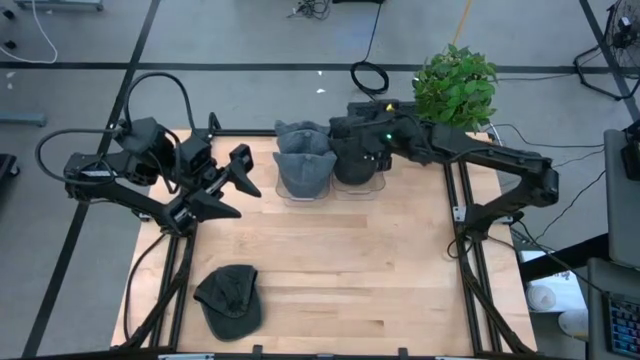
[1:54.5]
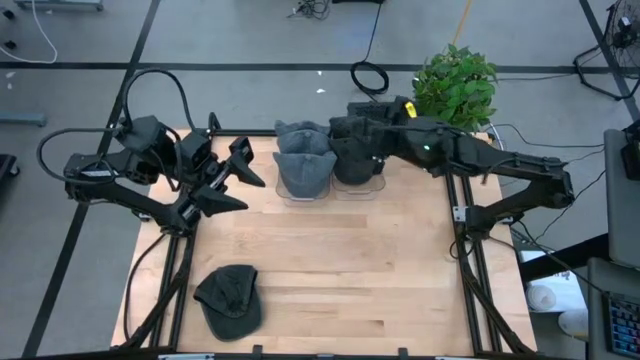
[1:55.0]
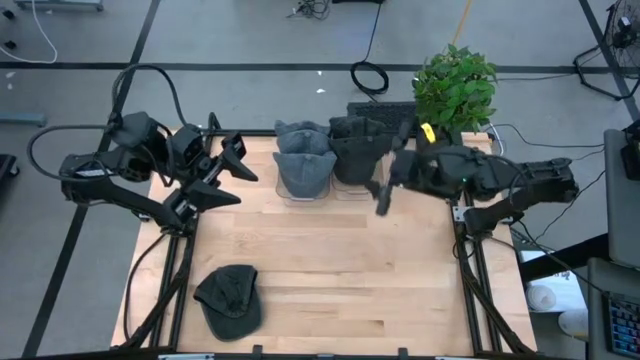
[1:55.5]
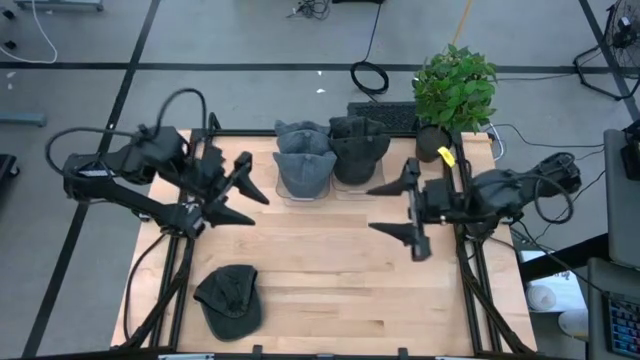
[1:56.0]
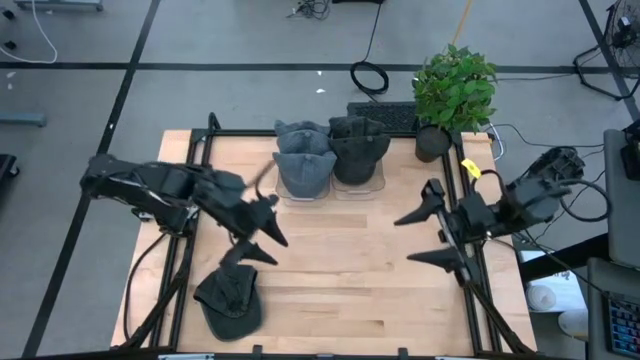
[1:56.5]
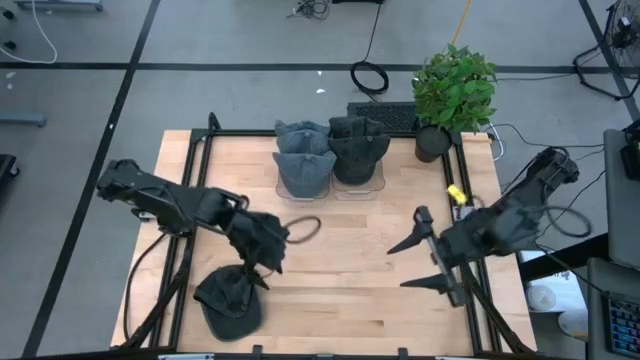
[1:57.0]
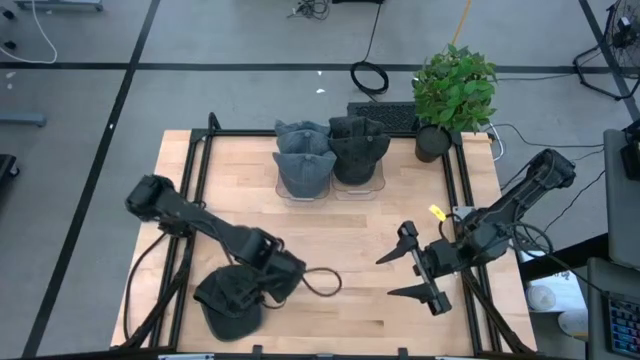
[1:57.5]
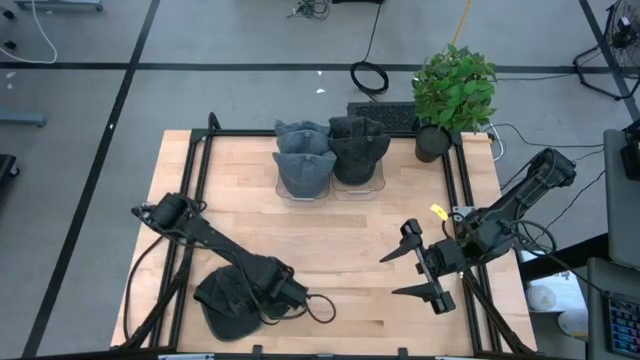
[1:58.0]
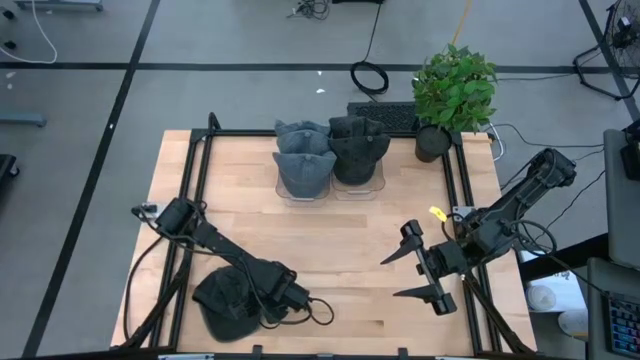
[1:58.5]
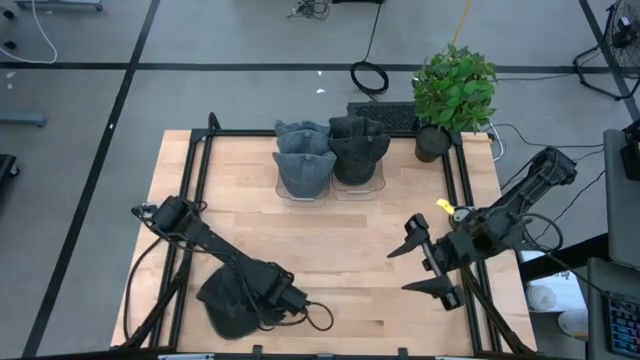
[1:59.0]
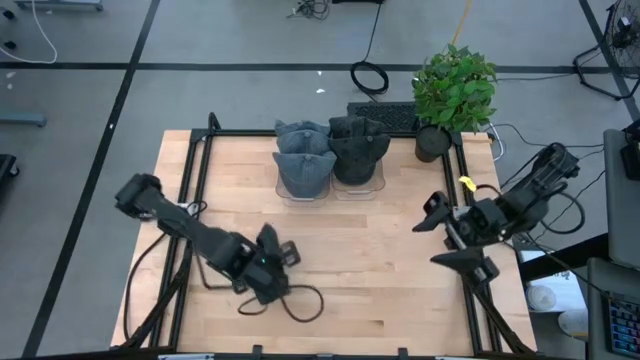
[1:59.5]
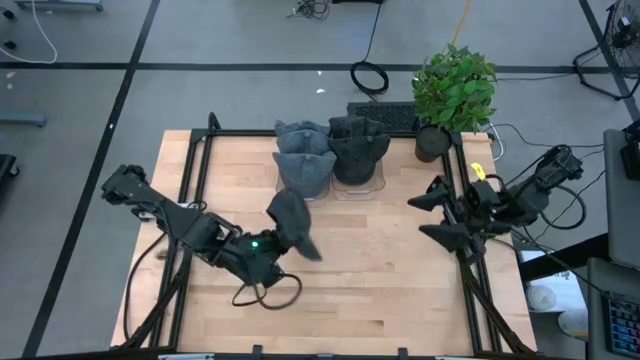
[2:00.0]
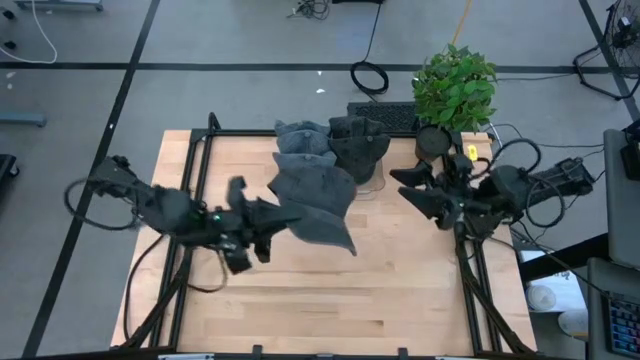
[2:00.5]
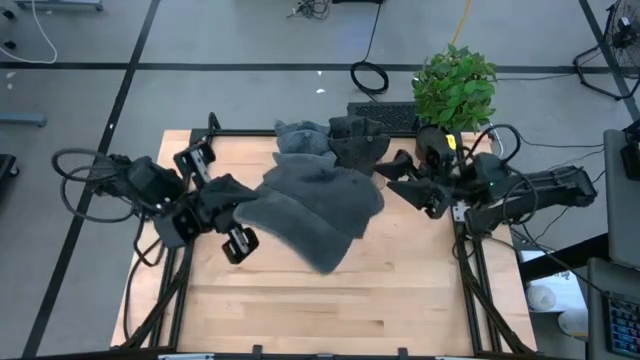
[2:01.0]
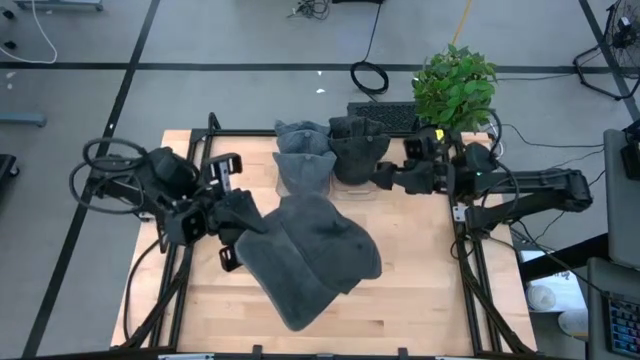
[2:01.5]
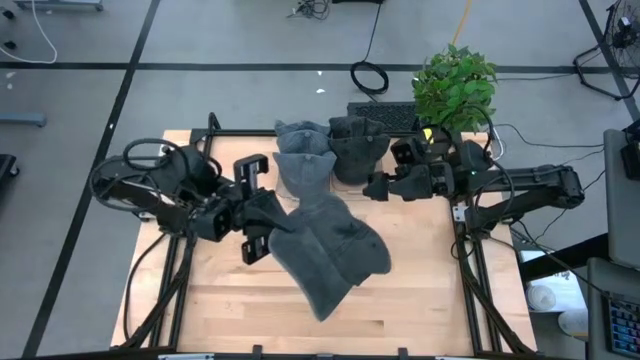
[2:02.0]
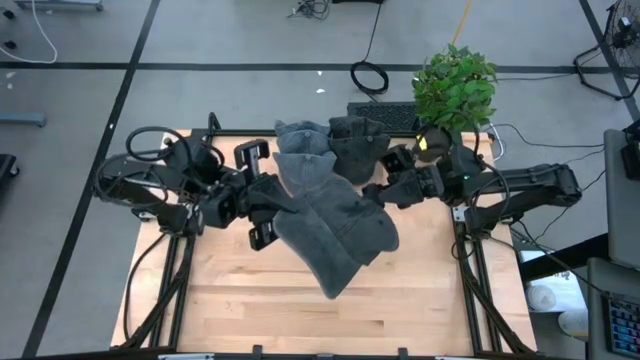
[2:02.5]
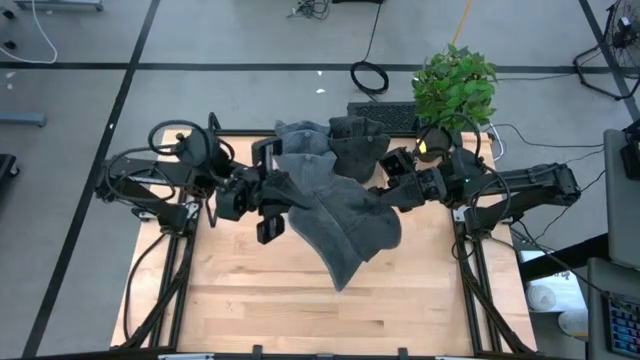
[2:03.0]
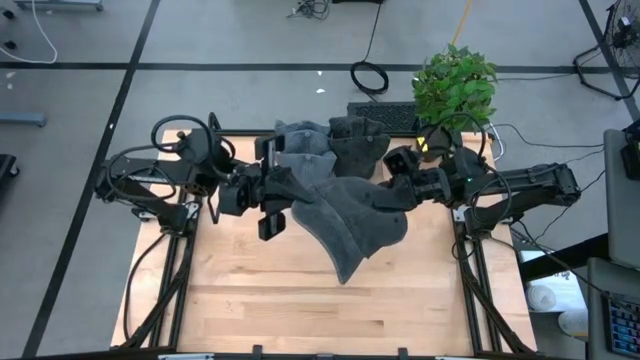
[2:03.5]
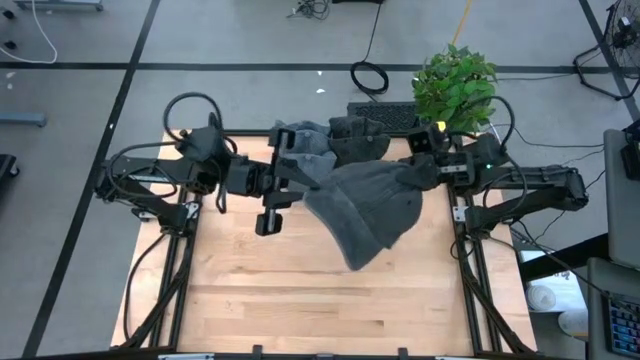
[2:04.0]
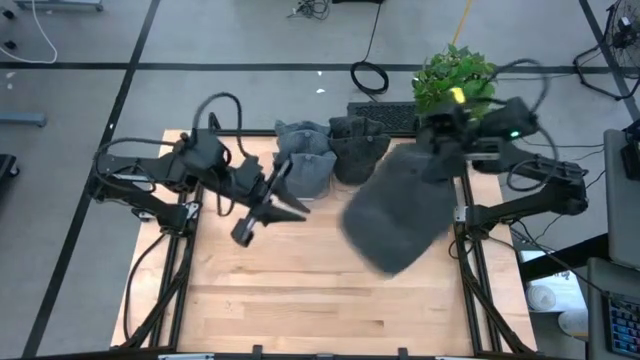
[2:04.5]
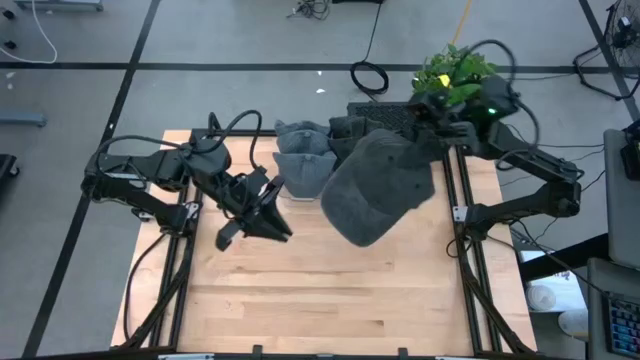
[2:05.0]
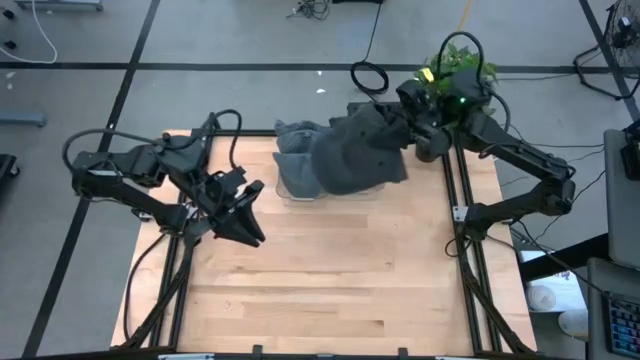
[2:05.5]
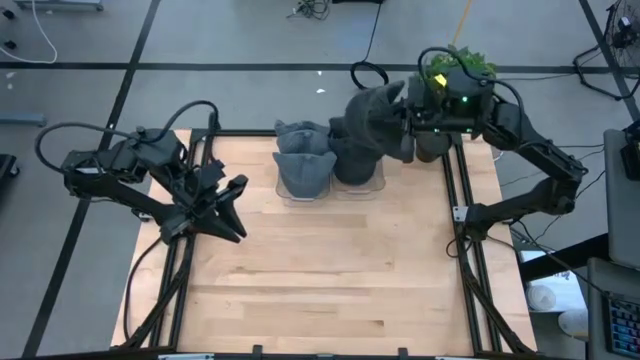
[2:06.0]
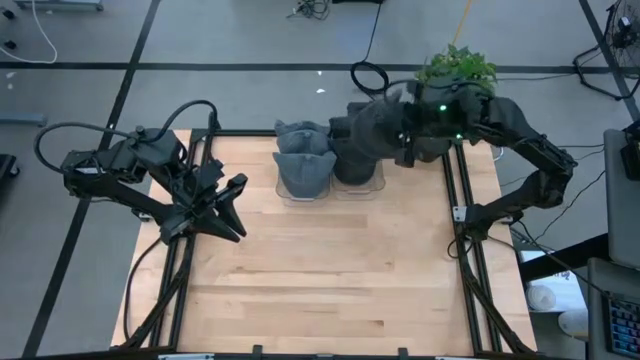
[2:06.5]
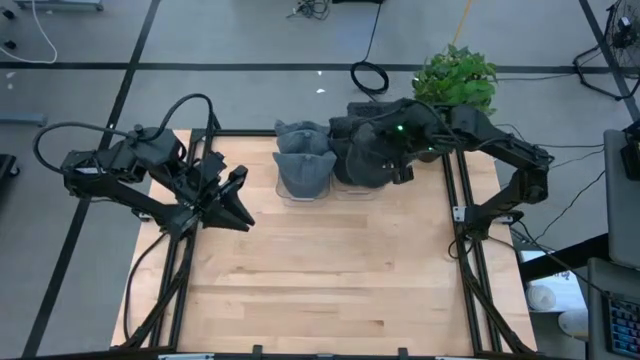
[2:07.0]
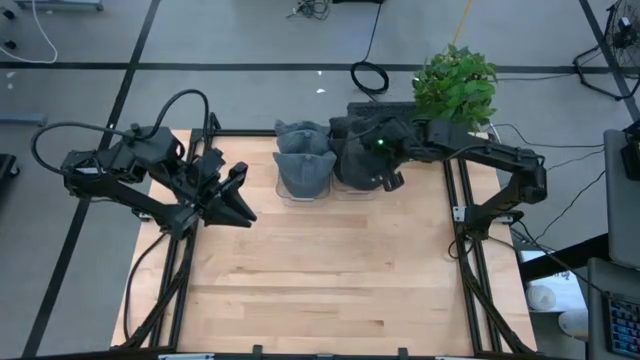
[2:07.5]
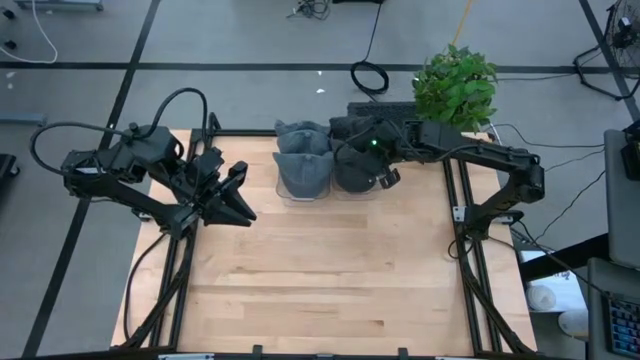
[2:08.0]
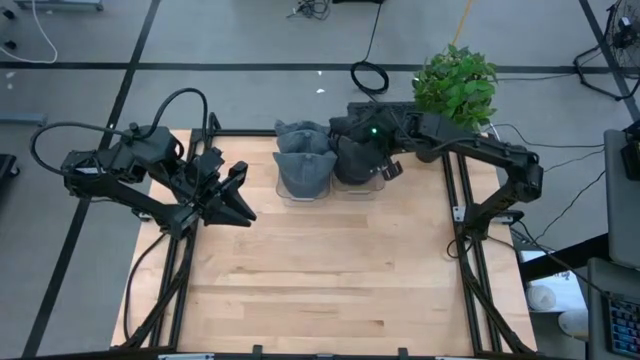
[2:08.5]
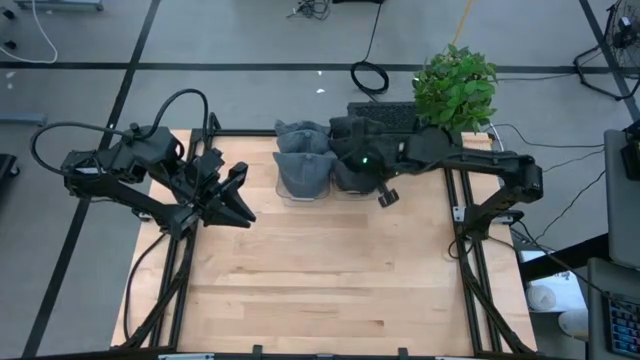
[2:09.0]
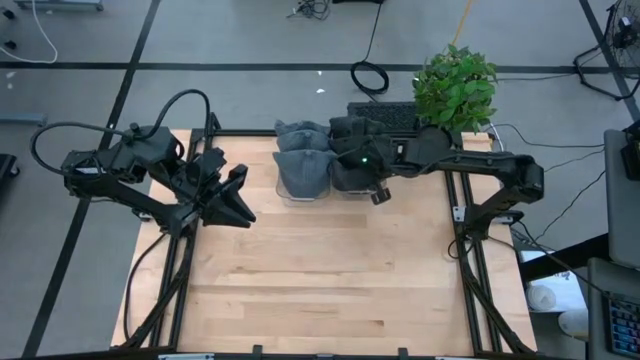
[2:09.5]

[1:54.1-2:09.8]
Task: Pick & Place hat
Put the black cap into the right transparent bin

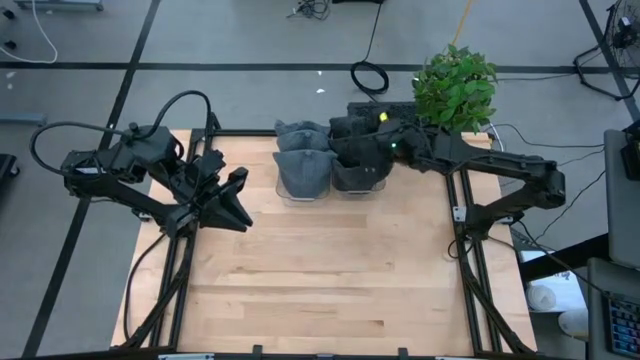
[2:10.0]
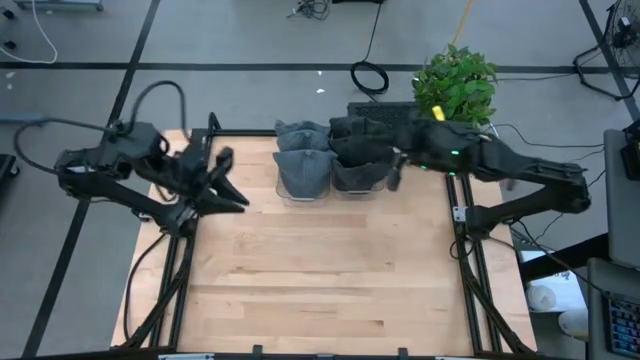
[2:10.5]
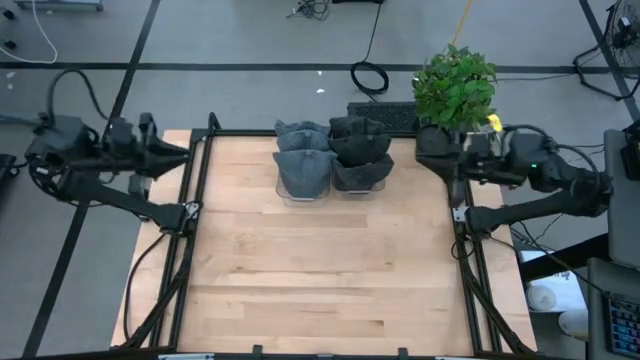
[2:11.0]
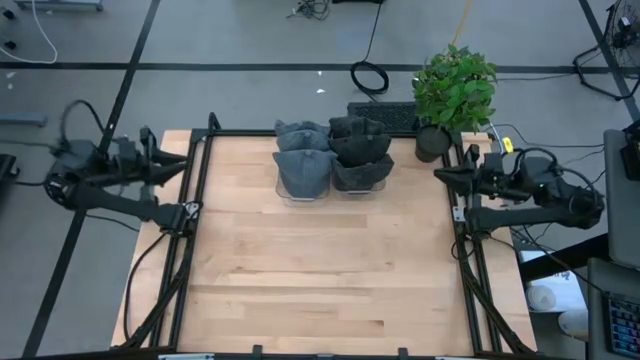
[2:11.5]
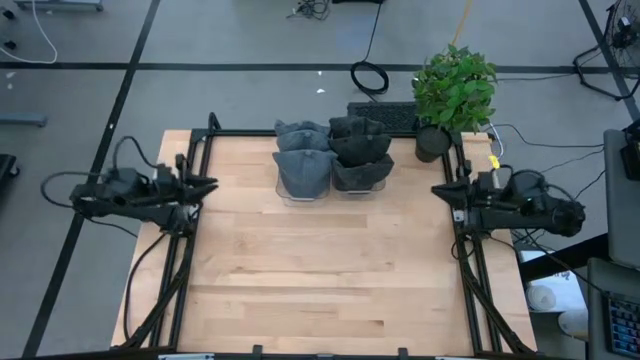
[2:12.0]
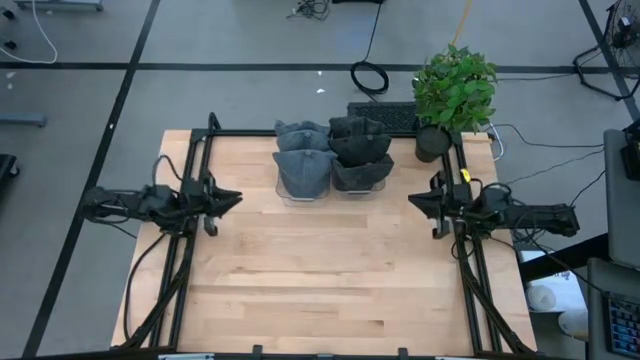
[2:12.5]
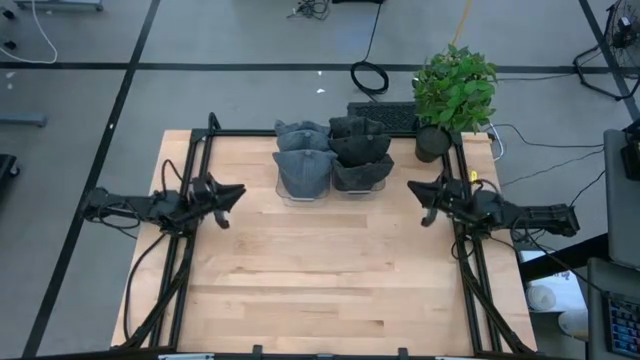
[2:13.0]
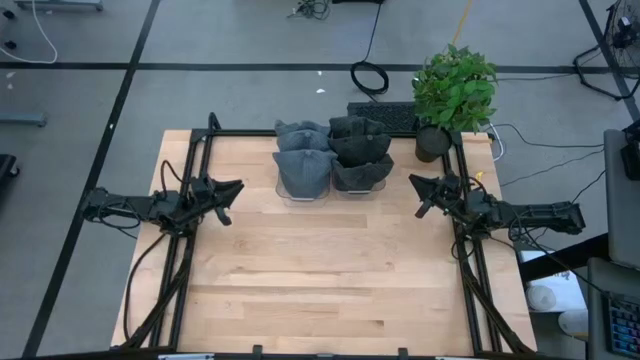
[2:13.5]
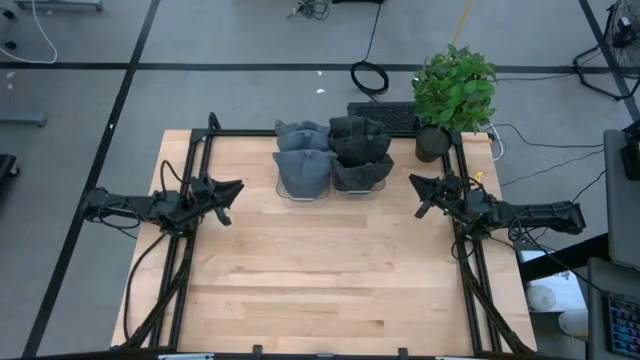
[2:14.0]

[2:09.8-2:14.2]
Return to Home Position
